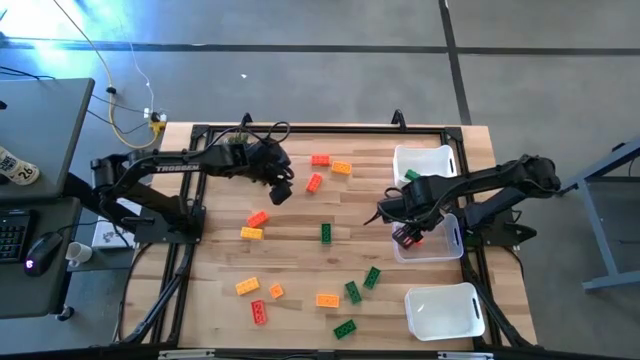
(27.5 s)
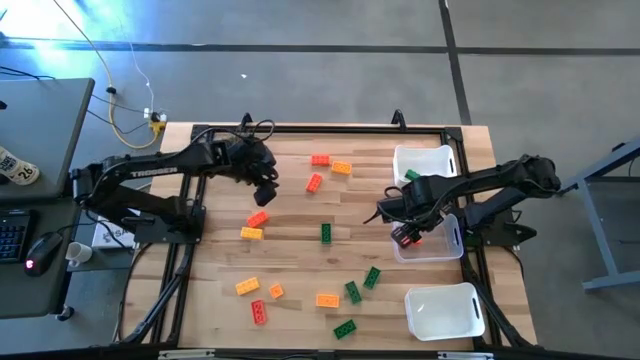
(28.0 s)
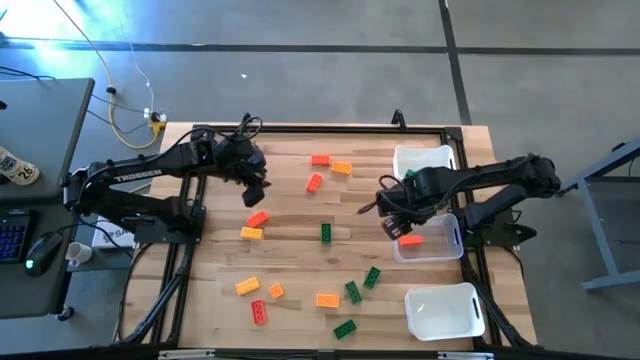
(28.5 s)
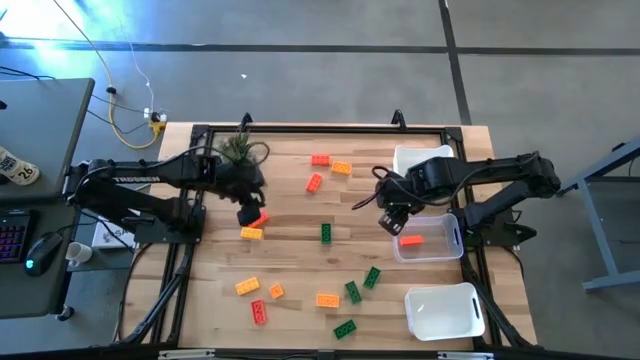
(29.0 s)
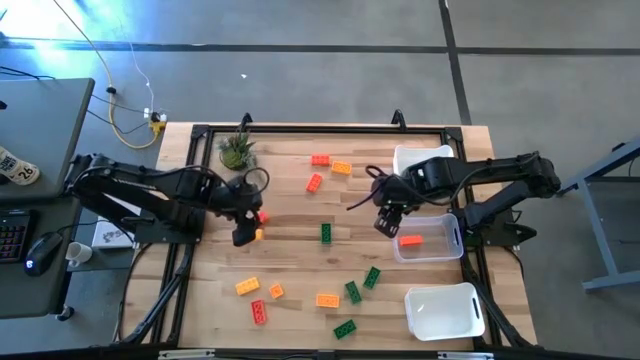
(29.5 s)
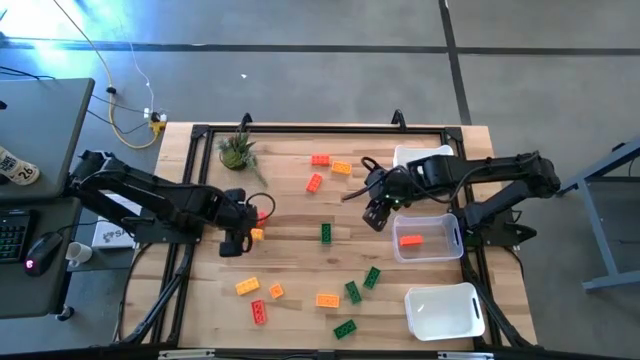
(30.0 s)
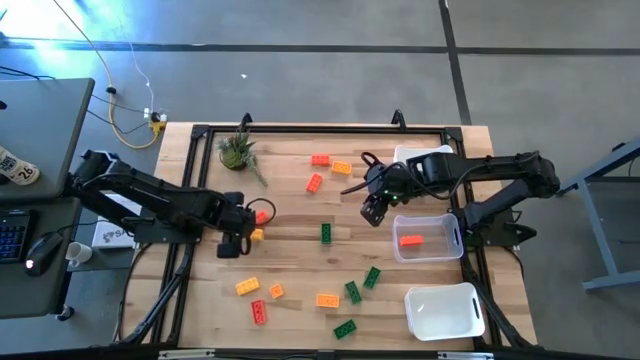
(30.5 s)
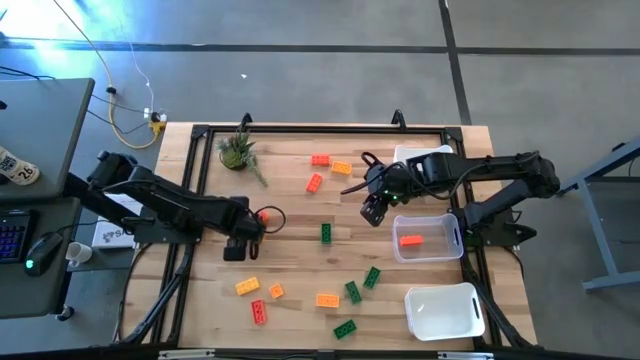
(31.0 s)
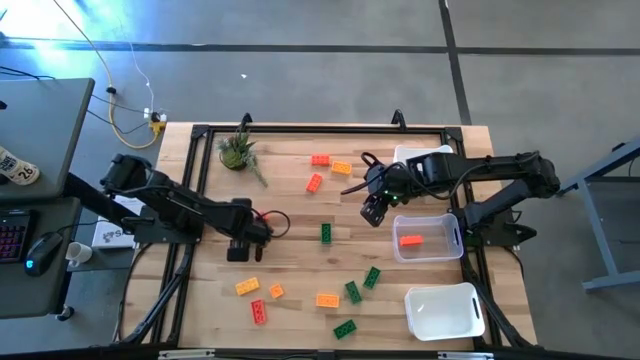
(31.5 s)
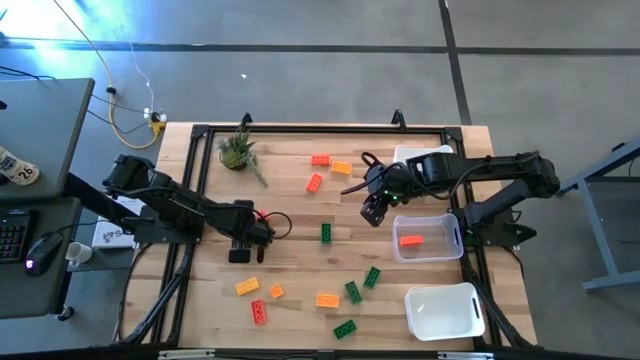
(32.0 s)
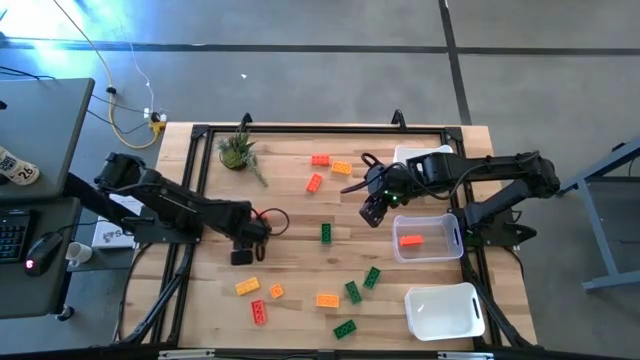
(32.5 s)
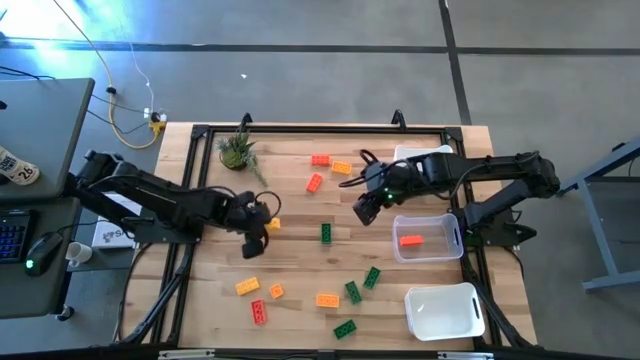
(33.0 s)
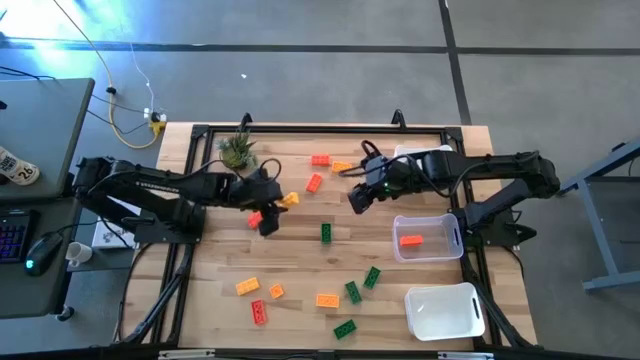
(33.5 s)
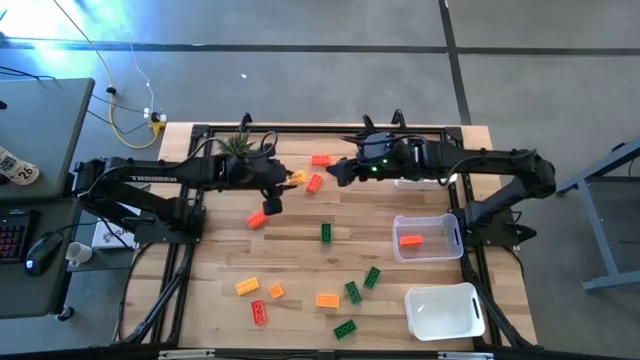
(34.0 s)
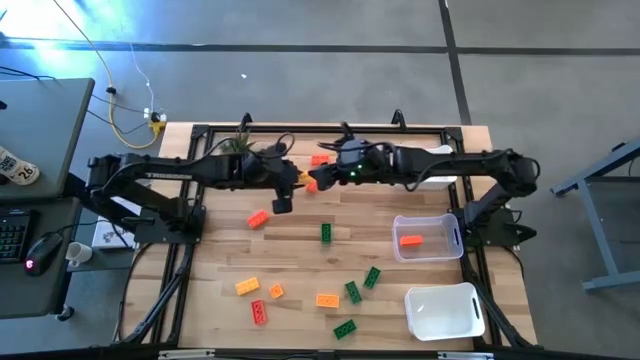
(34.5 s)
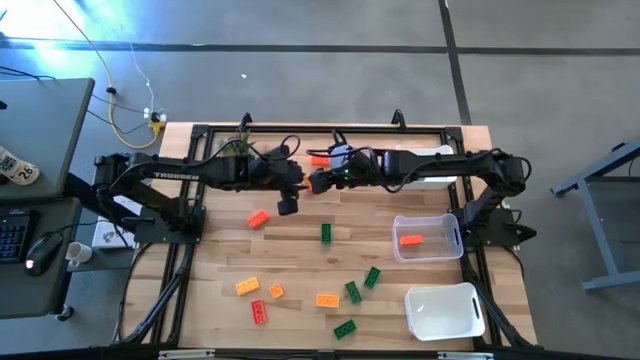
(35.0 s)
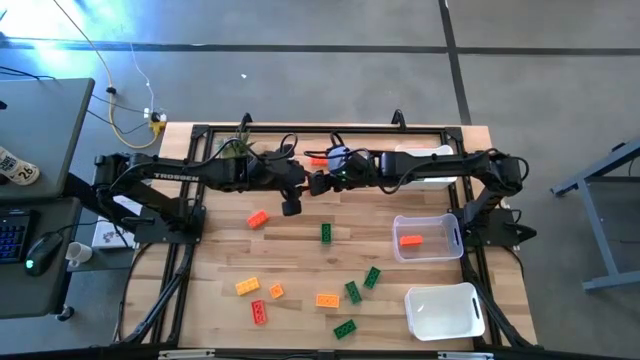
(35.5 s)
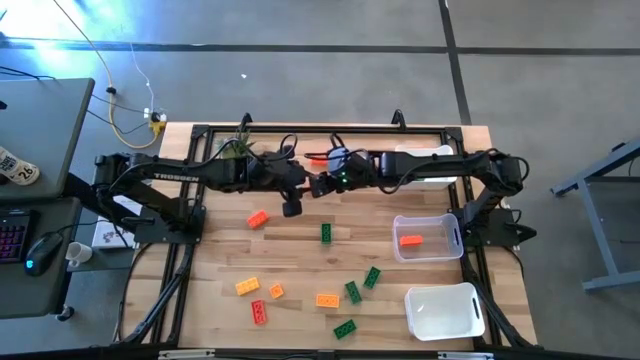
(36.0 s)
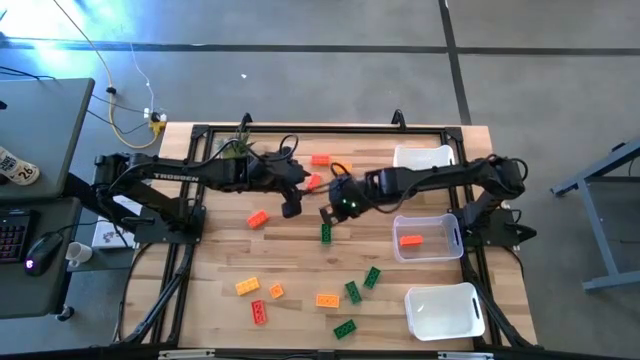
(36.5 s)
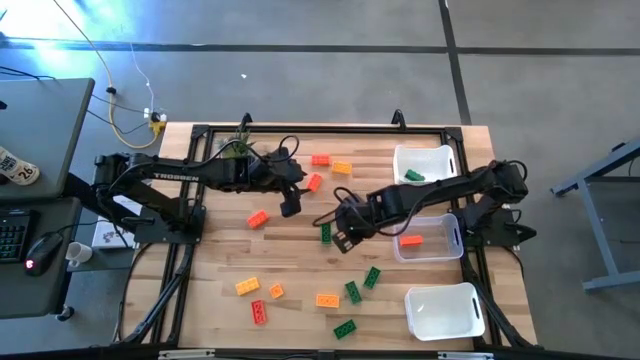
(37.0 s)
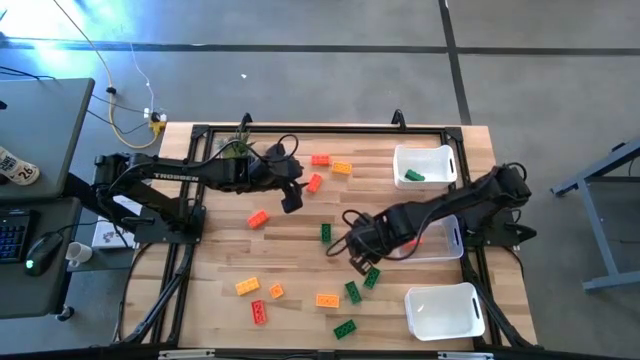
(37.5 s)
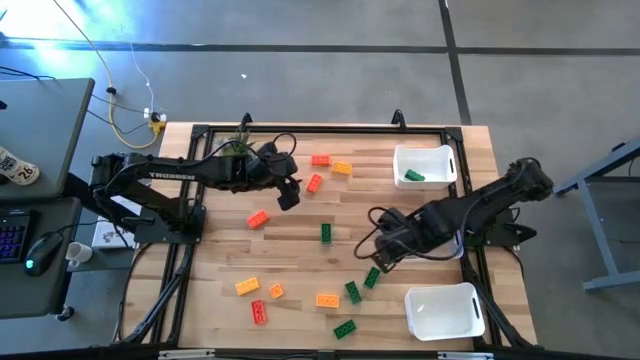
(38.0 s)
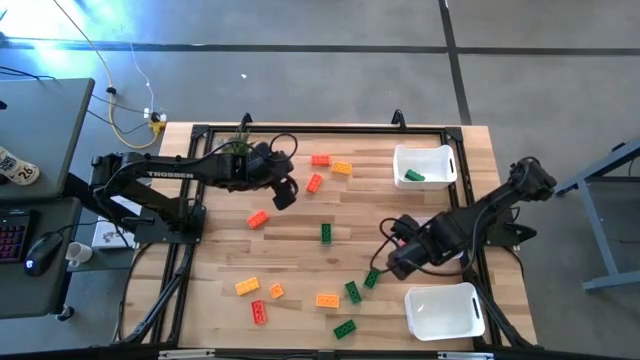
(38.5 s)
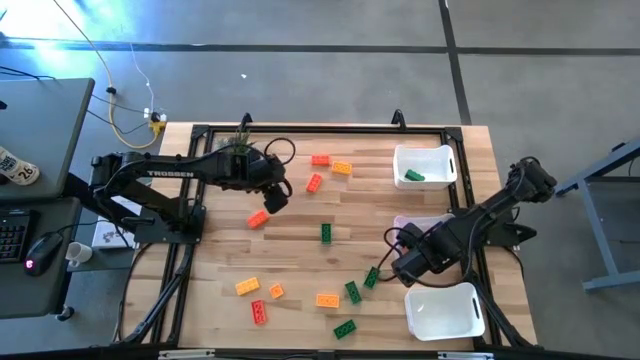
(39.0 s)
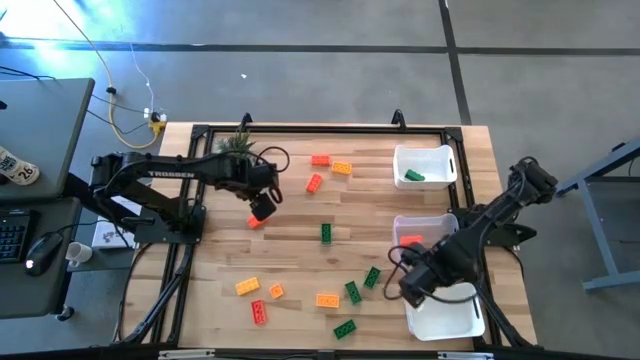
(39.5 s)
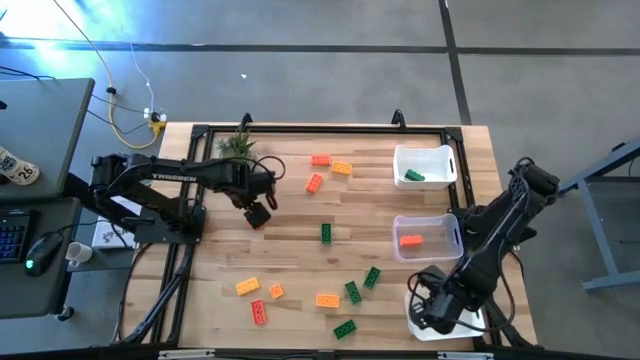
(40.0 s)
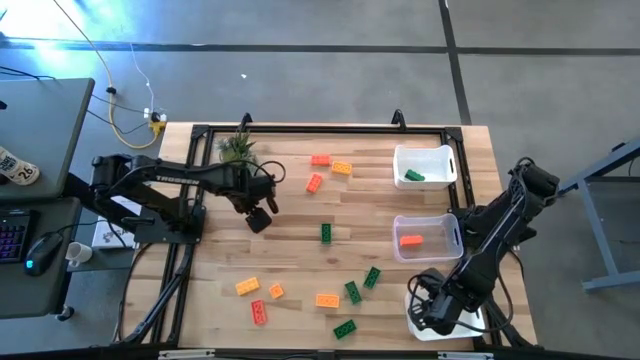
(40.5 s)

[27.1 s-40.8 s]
Task: Sort & place blocks by color
Put the yellow game piece into the bottom white bin

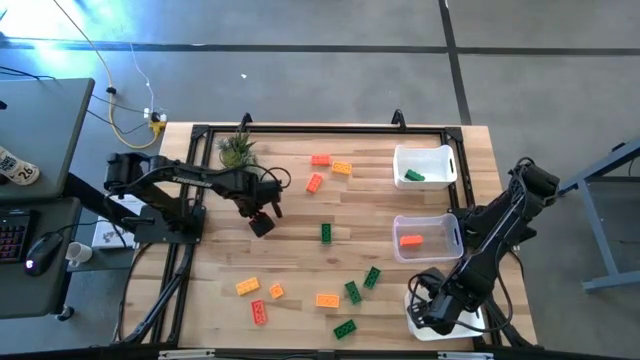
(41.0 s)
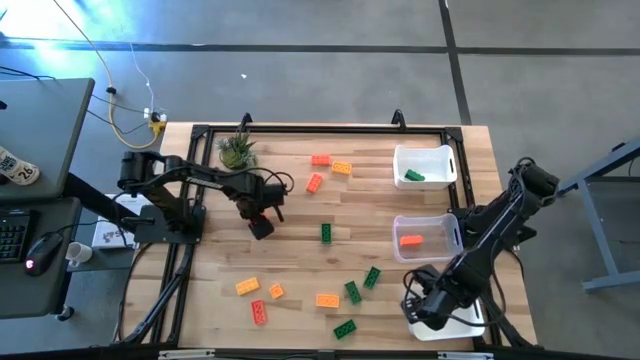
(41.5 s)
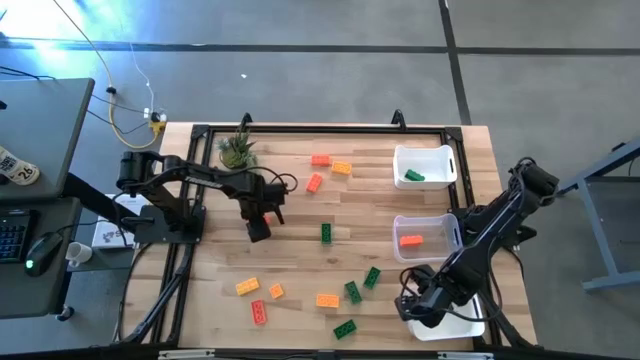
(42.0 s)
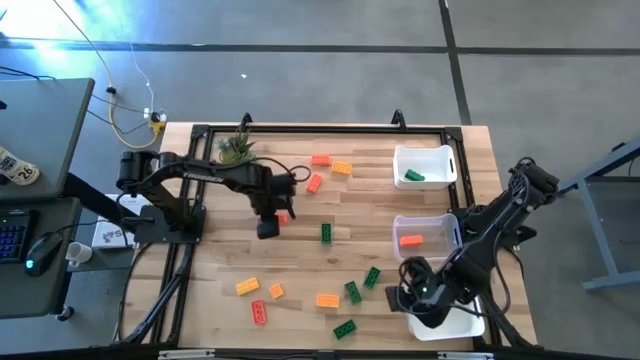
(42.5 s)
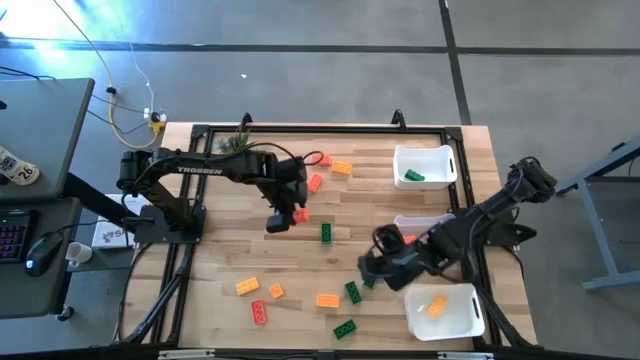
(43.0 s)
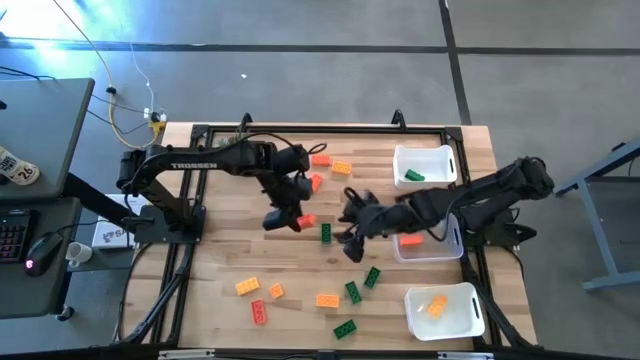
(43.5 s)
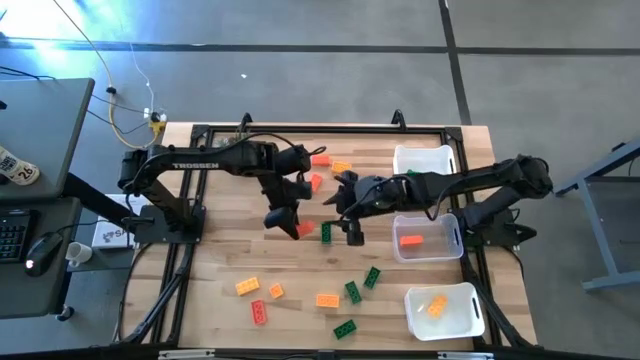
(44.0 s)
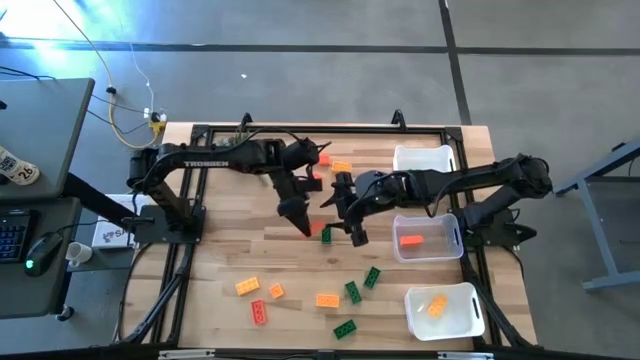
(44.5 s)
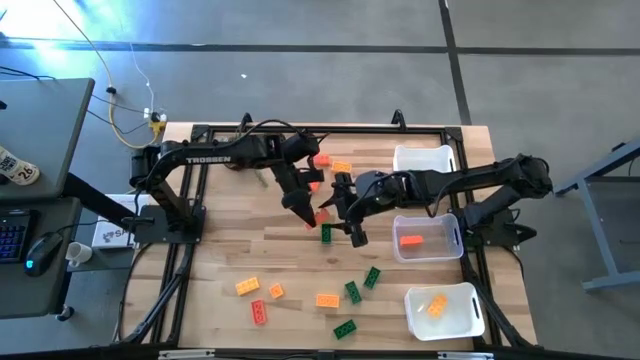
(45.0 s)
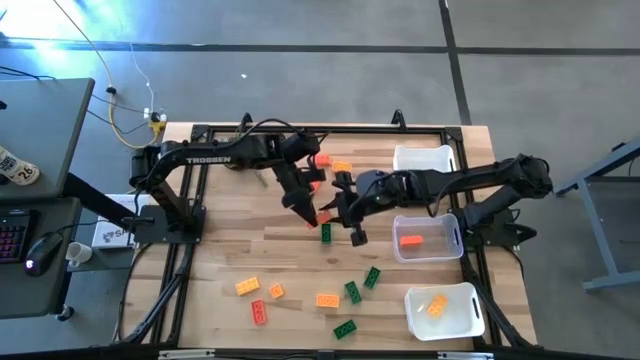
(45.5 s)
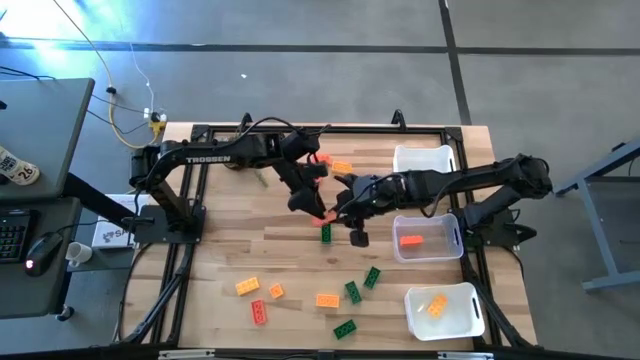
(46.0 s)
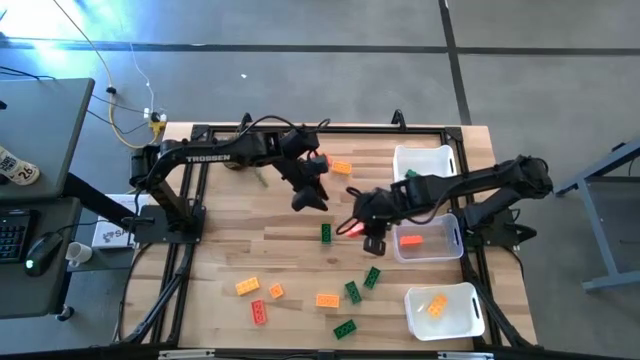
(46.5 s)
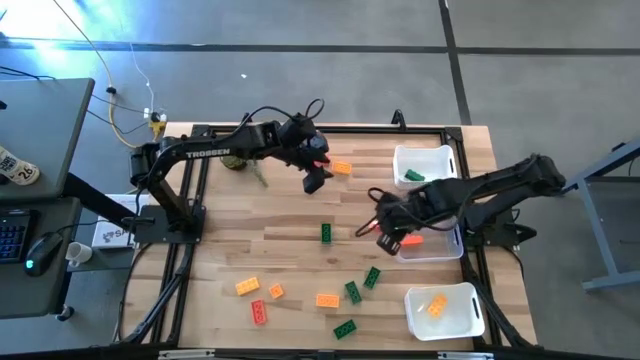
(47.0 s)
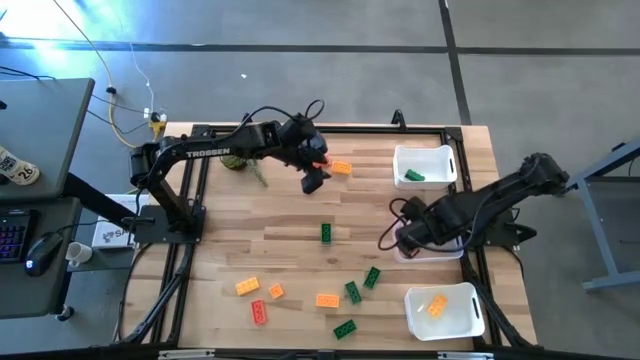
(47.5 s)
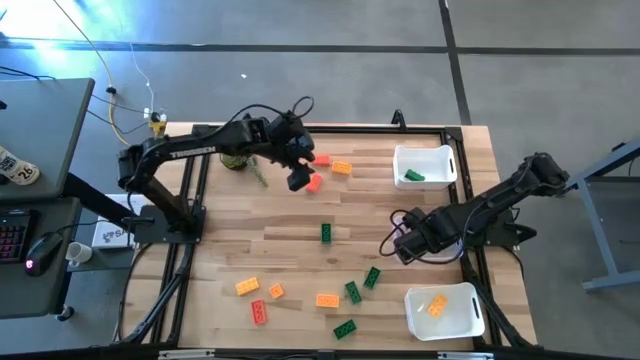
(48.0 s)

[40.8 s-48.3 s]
Put the orange game piece into the transparent bin
